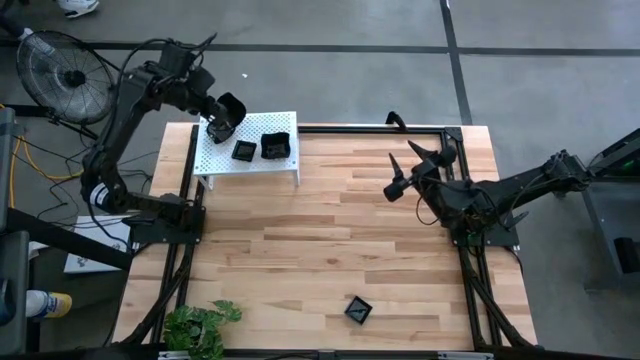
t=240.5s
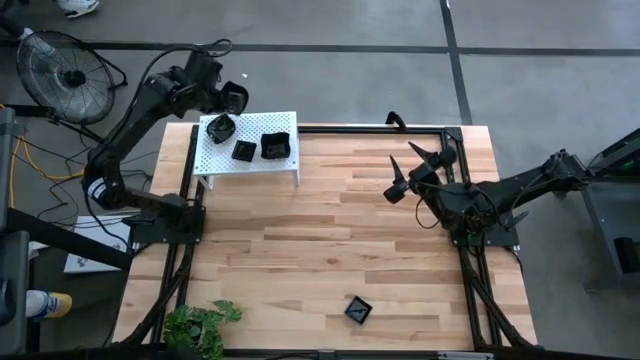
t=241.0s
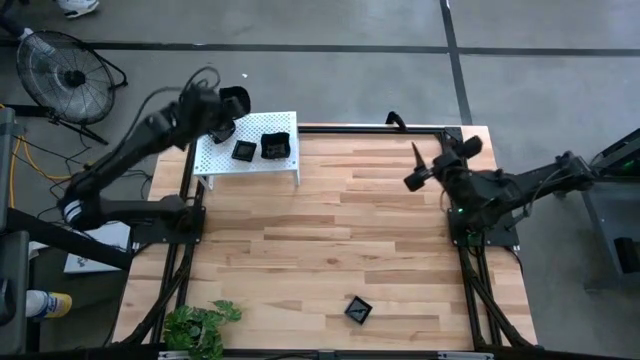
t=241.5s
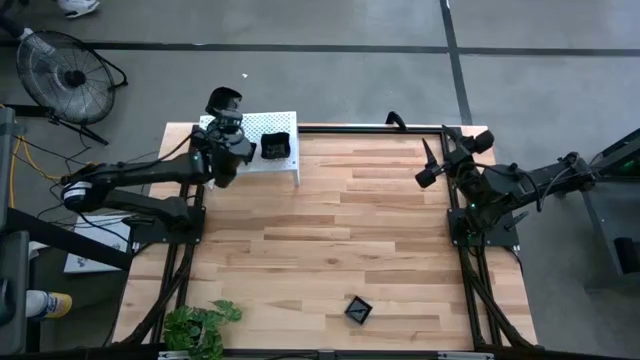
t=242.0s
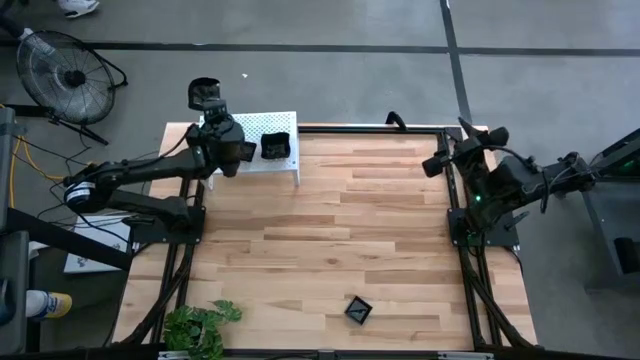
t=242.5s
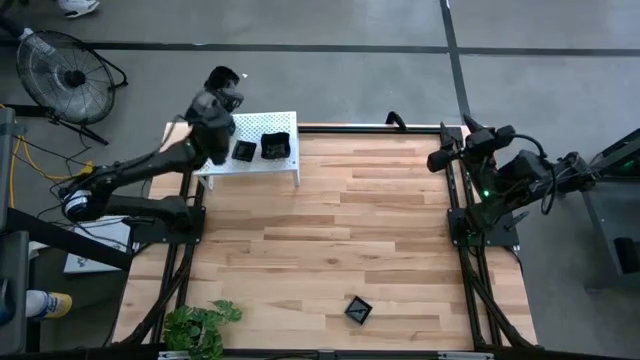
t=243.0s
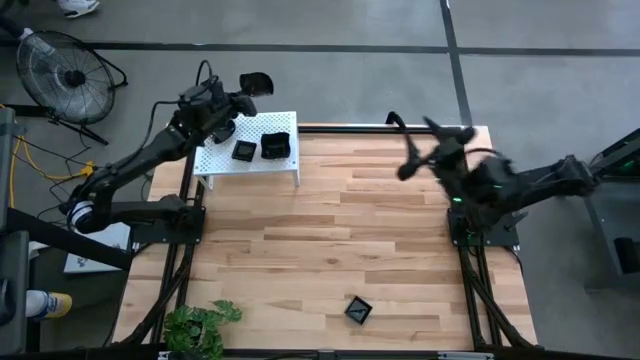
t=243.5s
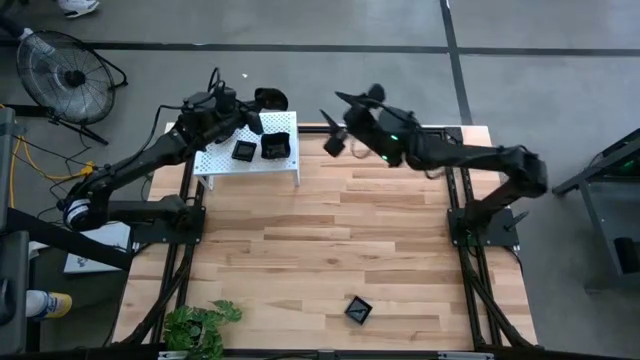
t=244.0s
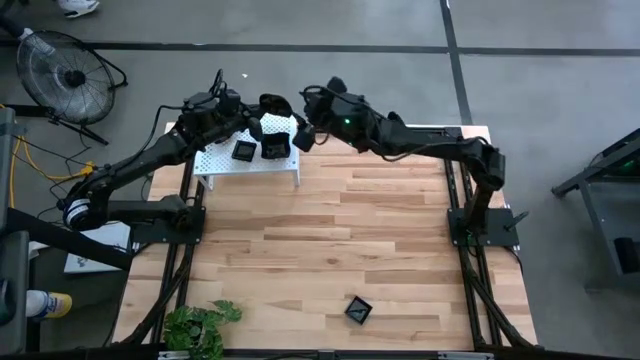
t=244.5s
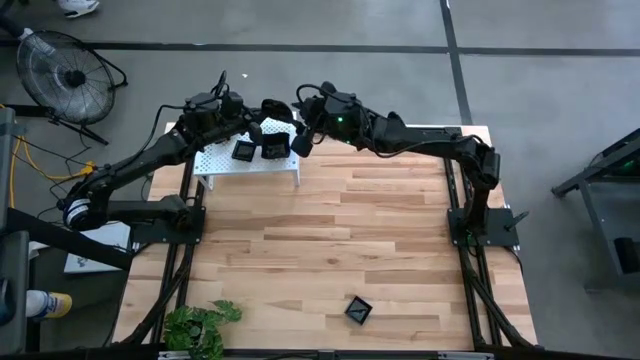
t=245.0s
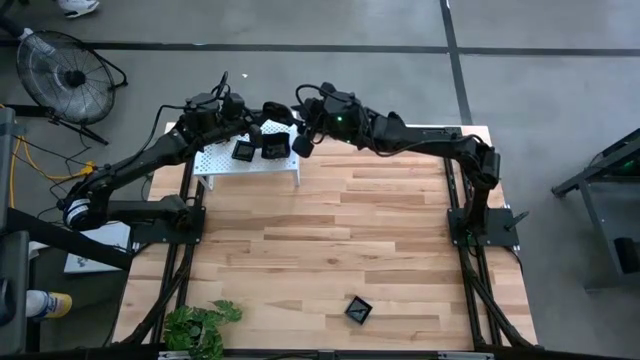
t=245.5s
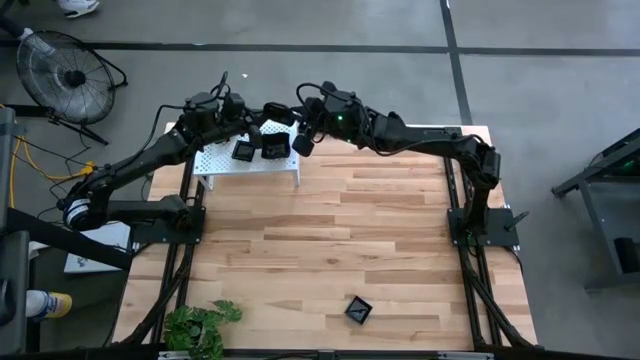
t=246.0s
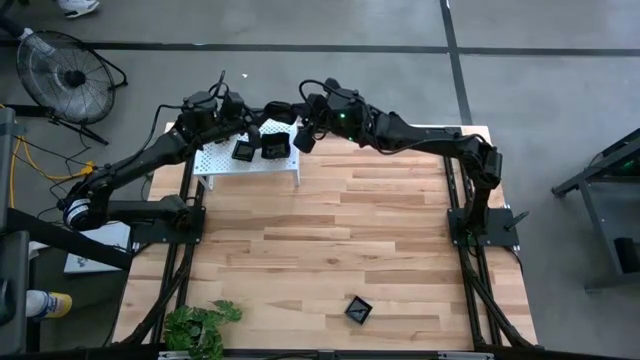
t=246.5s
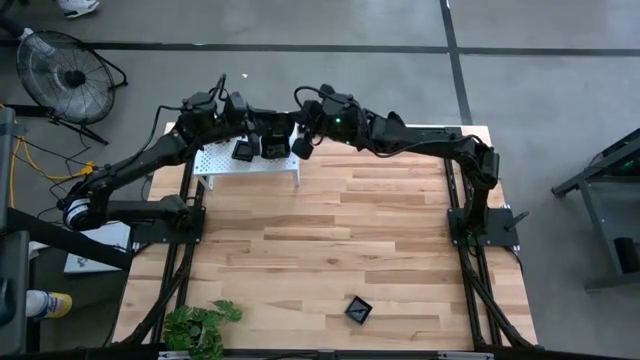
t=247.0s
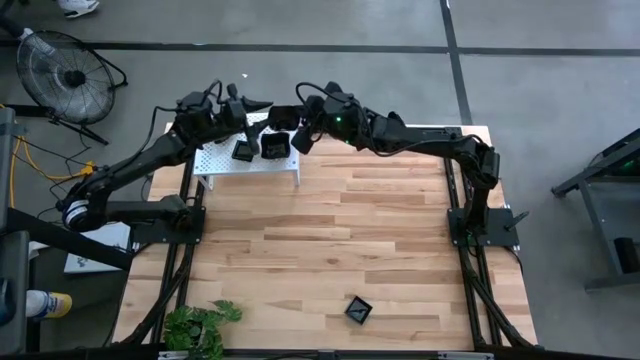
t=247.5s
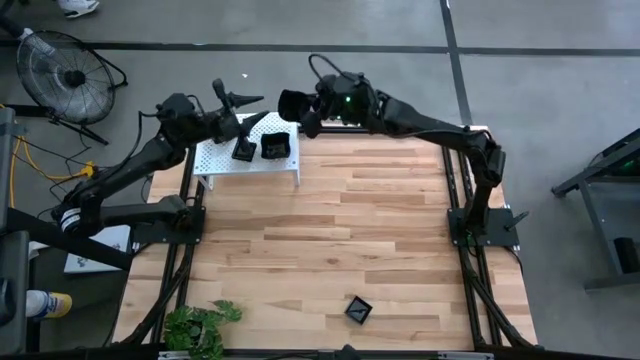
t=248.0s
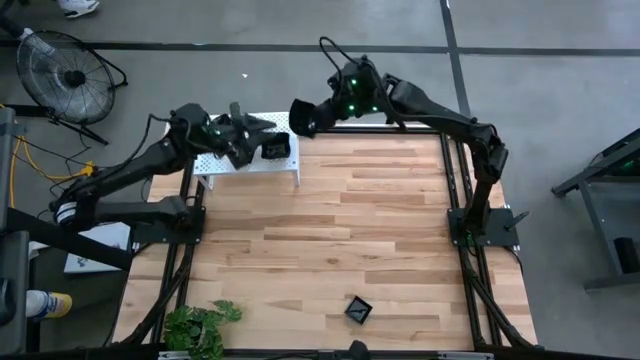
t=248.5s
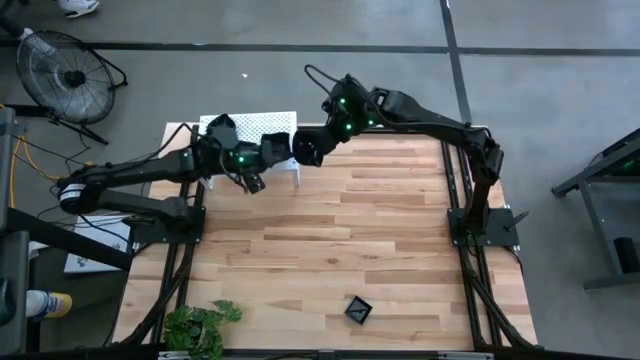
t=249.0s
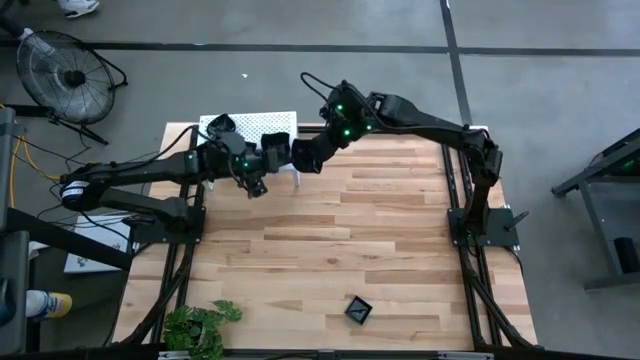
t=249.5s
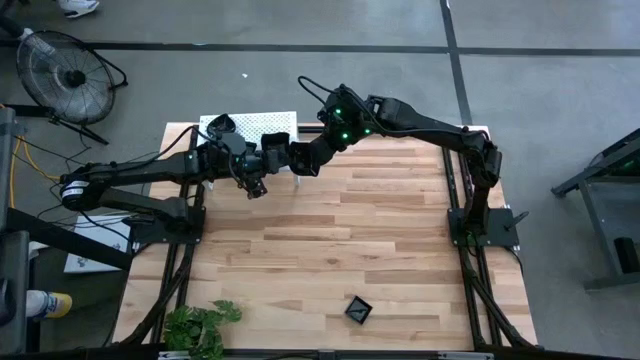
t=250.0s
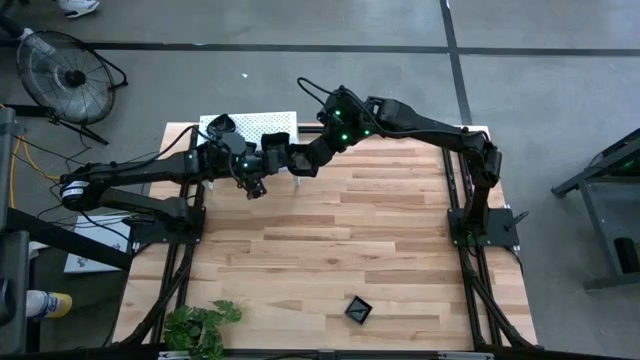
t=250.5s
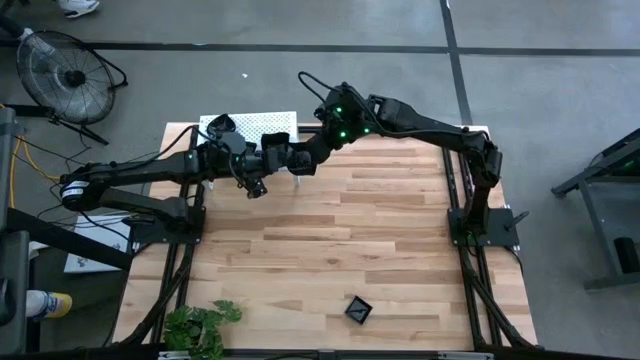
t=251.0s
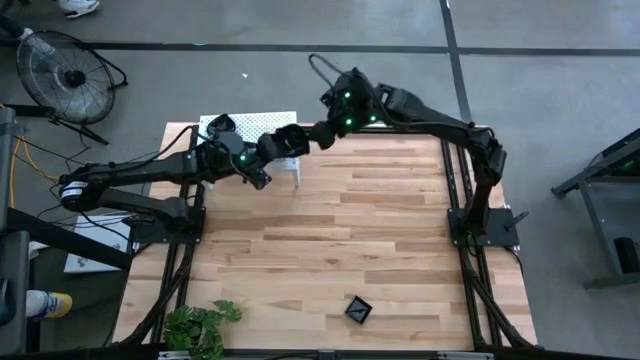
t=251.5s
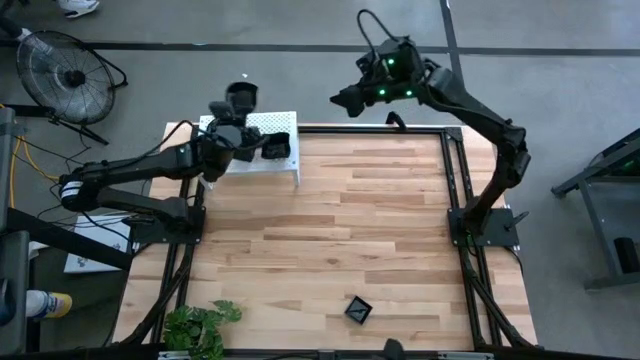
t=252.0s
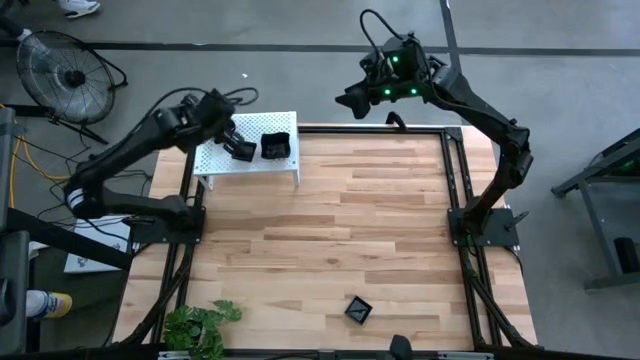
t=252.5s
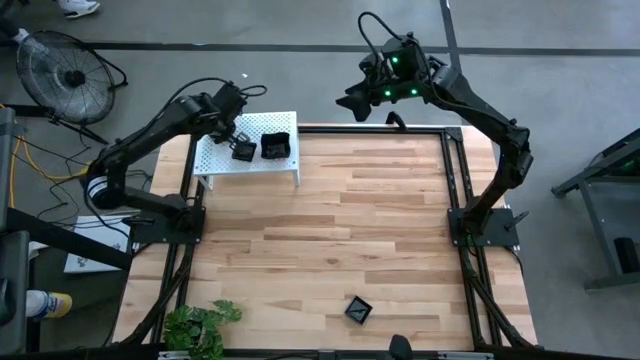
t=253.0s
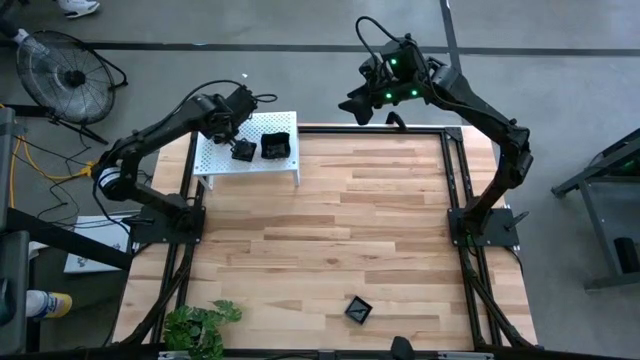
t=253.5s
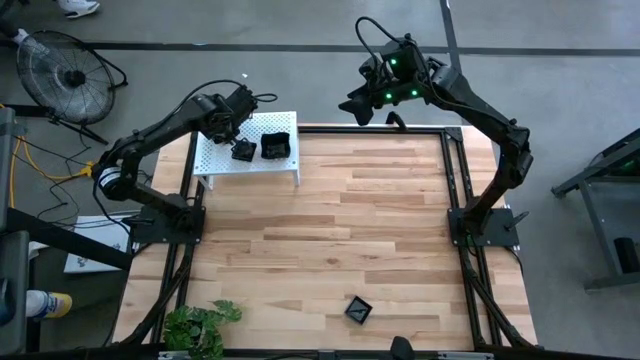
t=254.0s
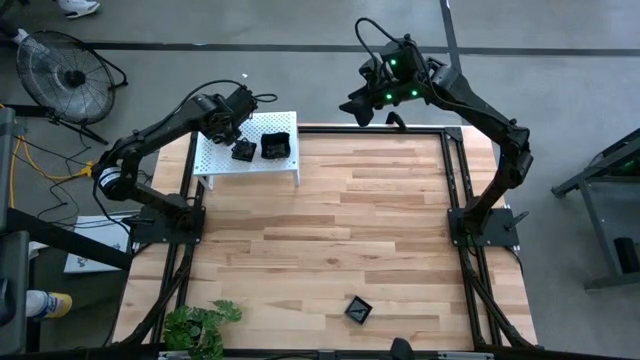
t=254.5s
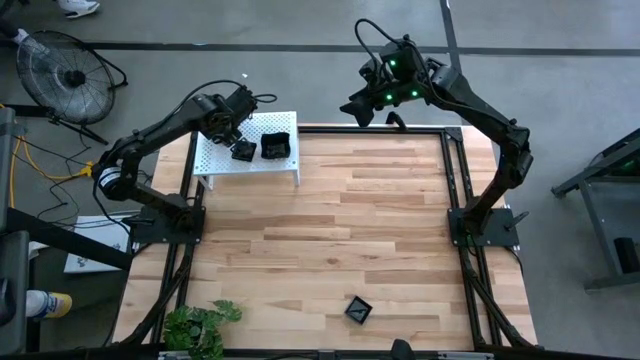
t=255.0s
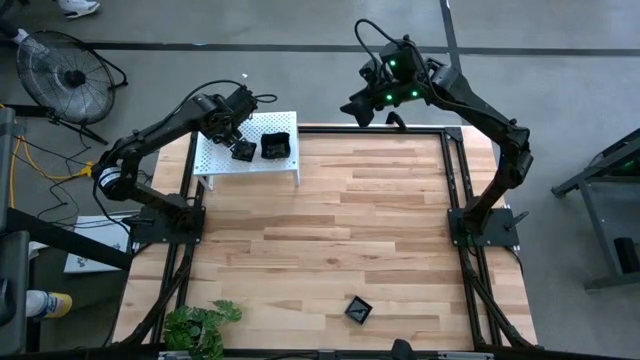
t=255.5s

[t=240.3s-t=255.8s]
Task: Pick & Place Mini shaped plates
Stack the black leaf shaped plate on top of the black leaf shaped plate on the shelf

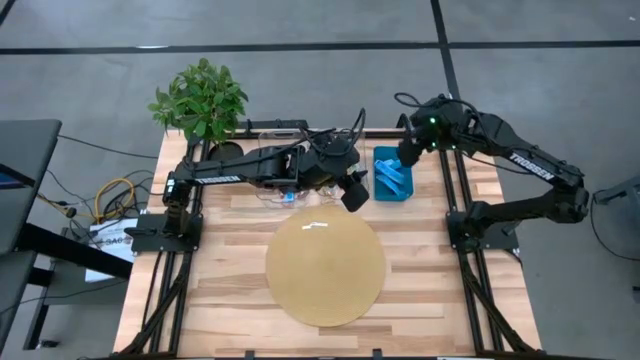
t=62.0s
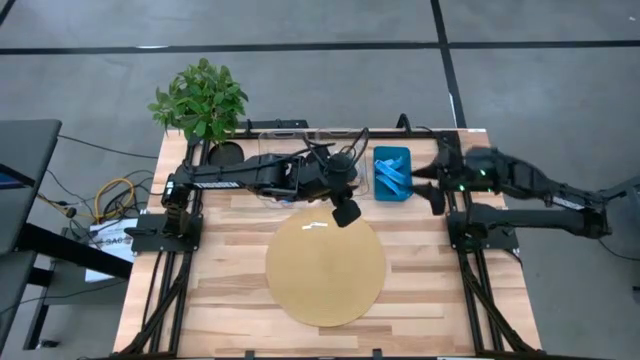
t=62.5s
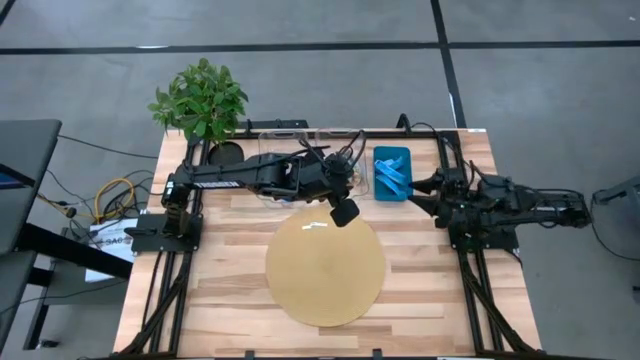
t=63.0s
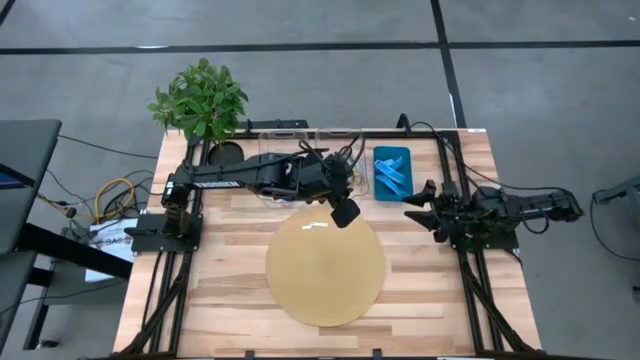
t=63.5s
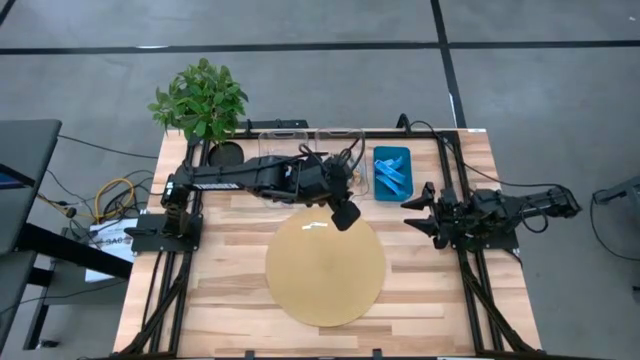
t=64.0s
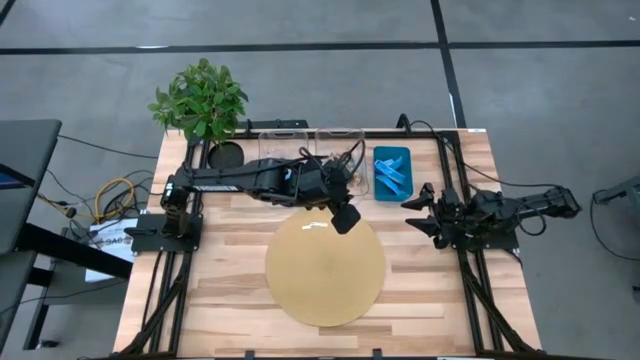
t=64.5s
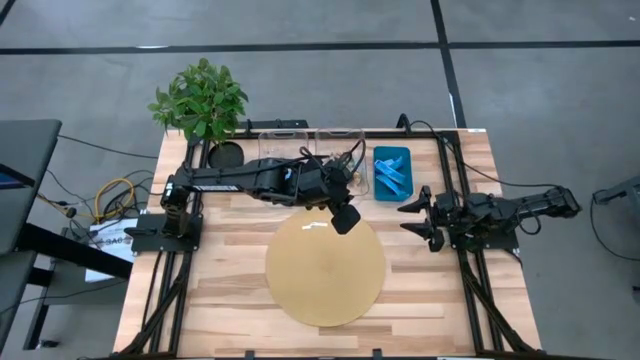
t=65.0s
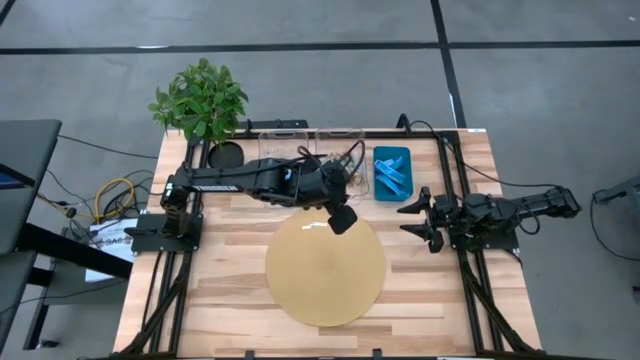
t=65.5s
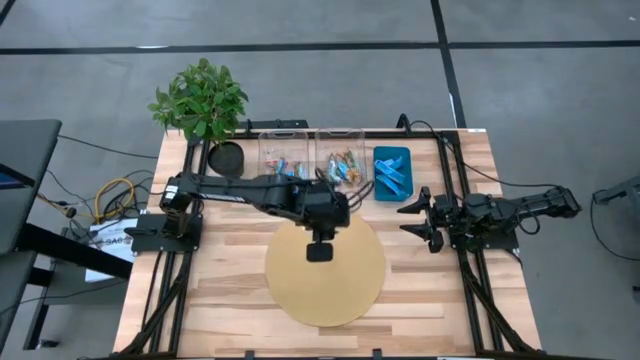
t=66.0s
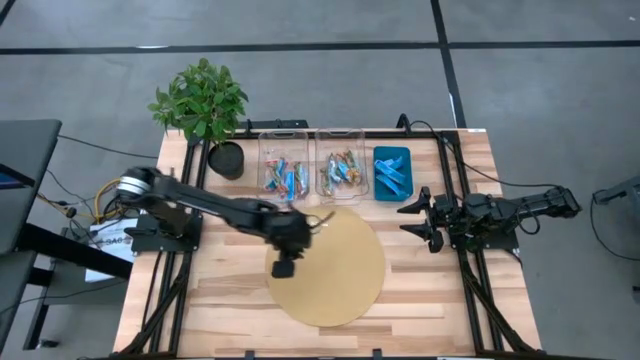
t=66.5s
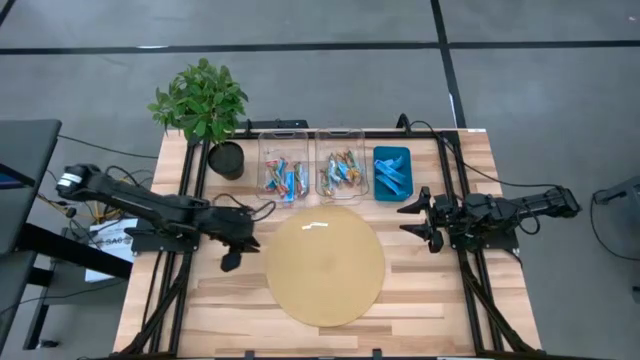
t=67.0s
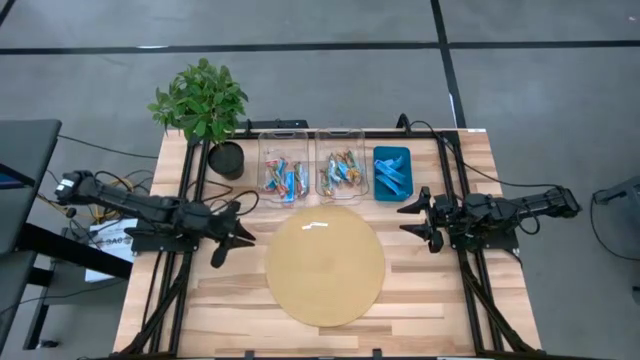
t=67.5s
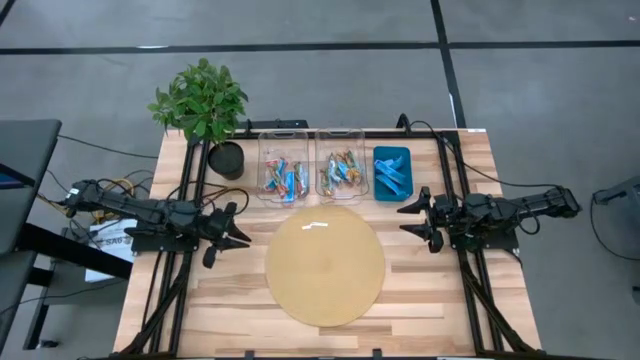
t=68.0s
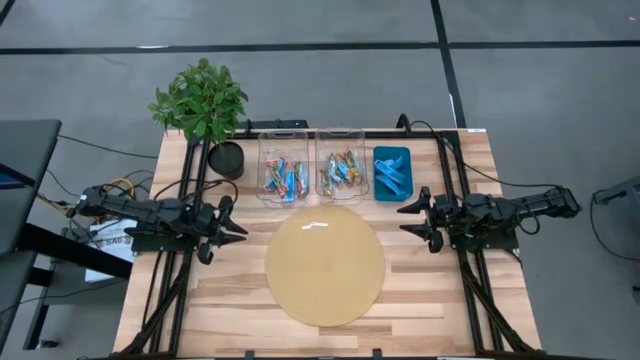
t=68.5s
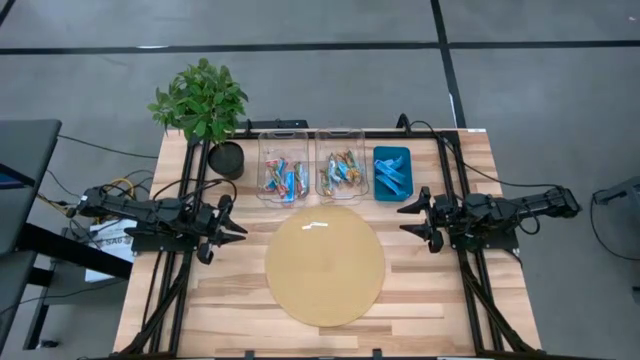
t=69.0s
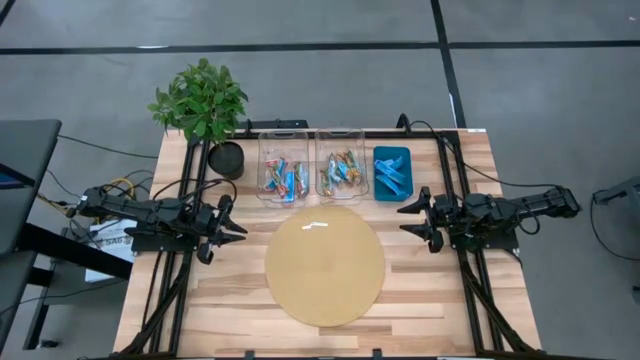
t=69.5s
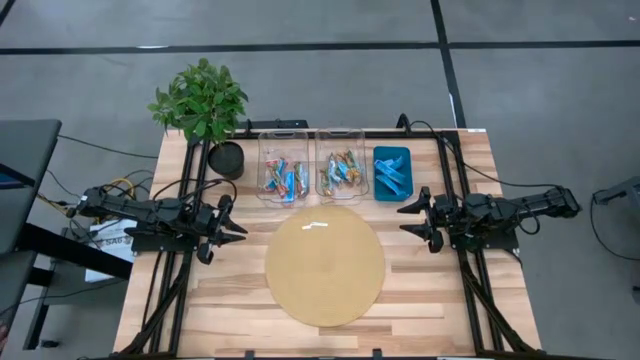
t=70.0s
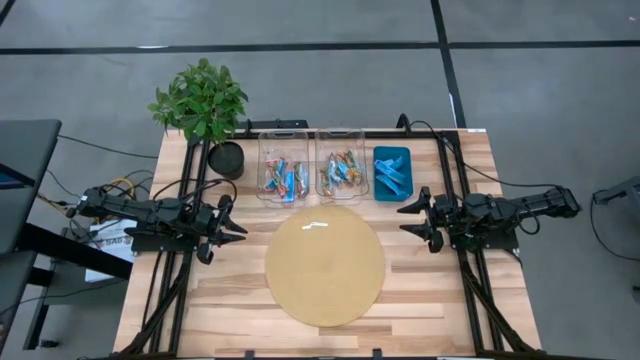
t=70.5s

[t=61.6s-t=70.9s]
Task: Pick and place Granola Bars by type
Return to Home Position
